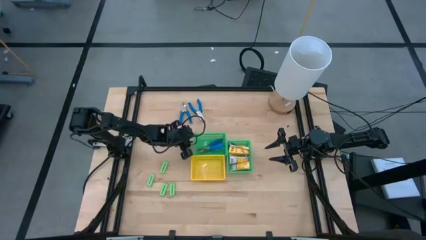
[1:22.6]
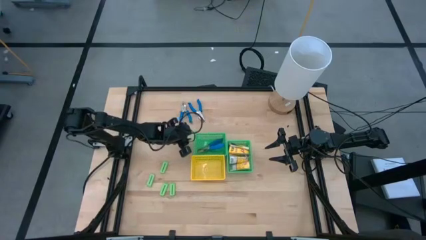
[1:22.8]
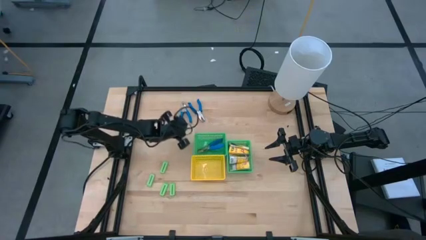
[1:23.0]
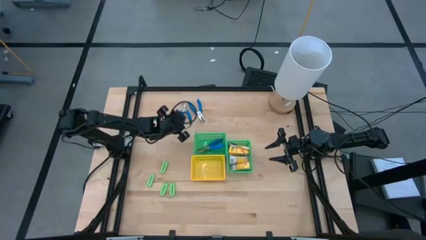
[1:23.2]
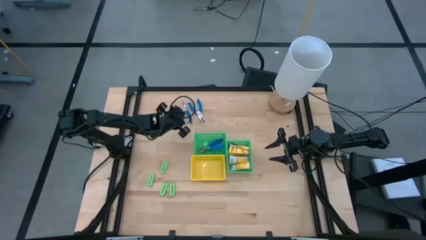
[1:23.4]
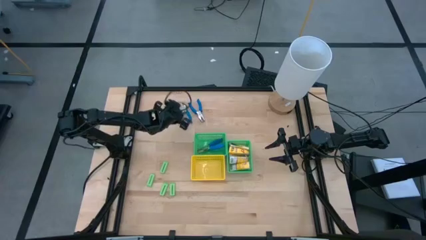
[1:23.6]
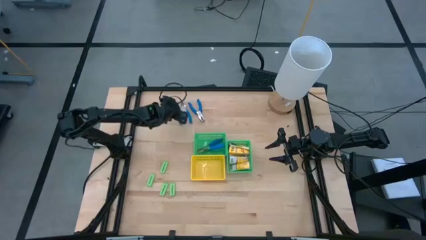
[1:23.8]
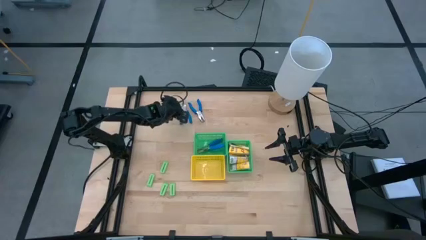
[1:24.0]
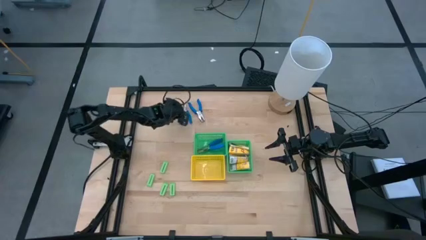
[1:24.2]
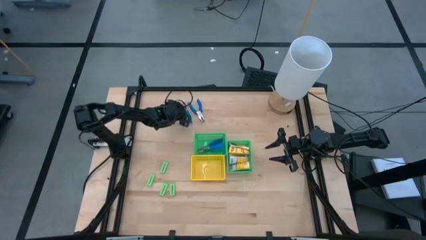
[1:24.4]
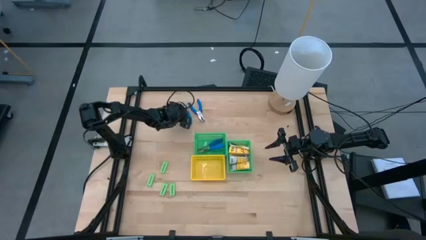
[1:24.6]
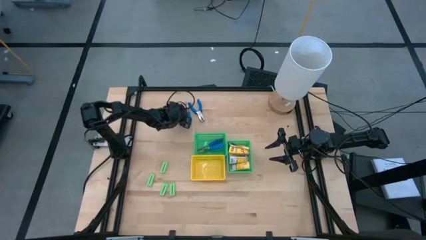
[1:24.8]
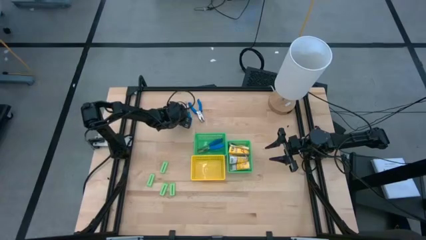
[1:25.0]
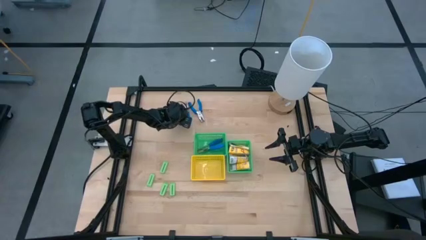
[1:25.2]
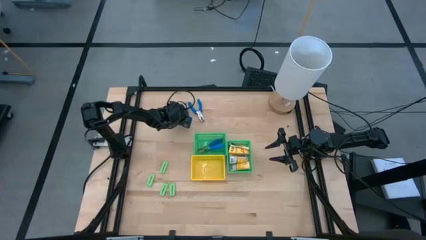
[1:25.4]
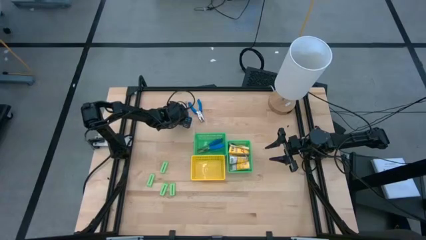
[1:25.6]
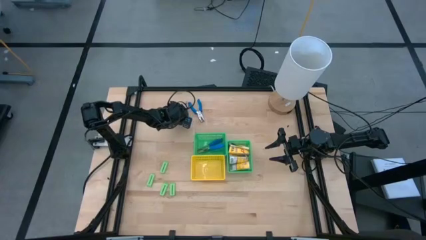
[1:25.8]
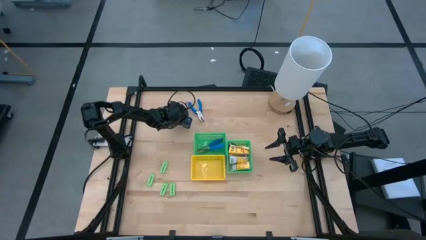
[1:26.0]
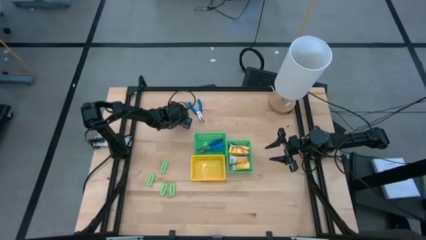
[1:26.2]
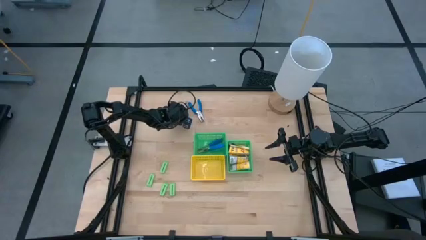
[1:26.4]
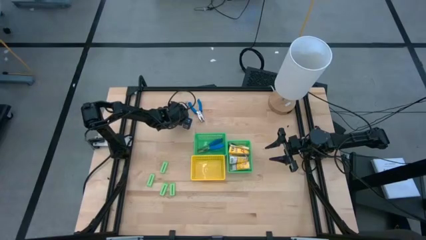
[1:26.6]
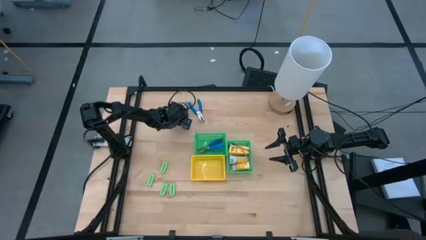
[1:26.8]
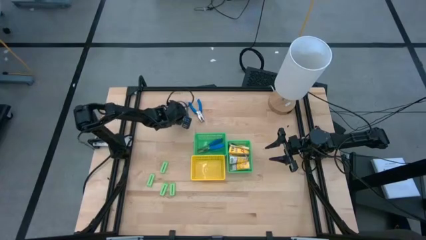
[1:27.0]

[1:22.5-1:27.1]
Task: Pick & Place School Supplies
Put the blue hole puncher into the right green bin

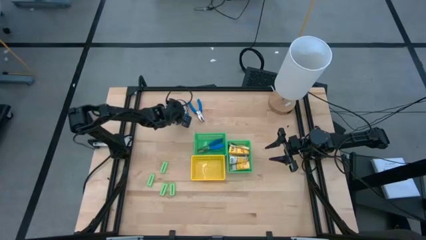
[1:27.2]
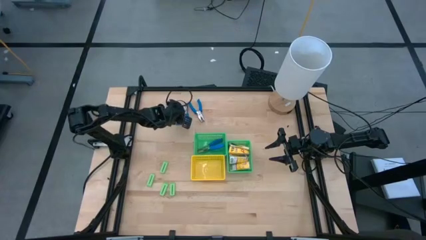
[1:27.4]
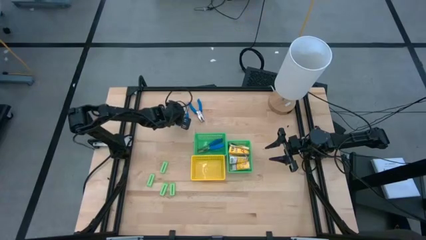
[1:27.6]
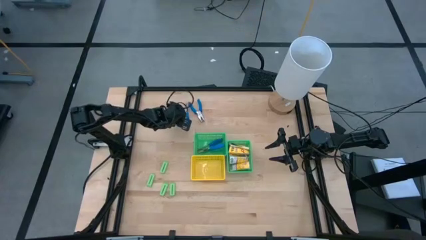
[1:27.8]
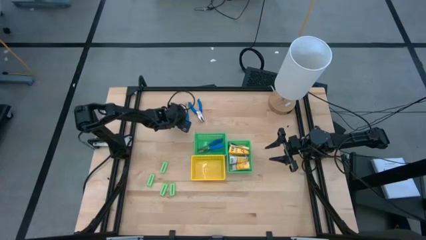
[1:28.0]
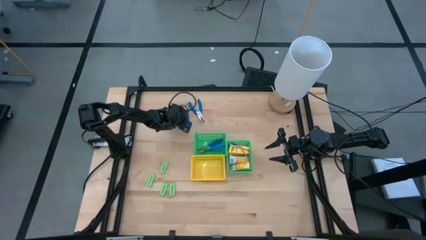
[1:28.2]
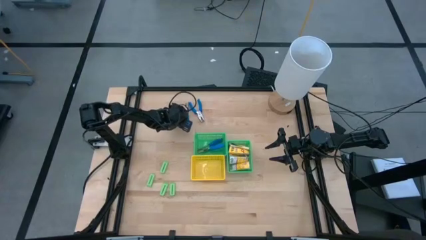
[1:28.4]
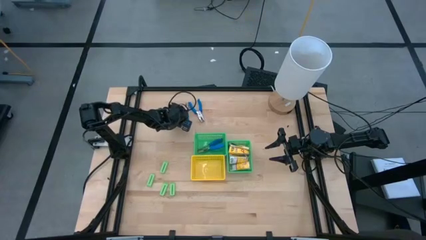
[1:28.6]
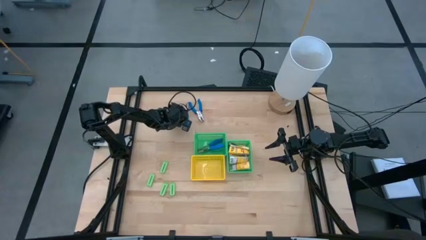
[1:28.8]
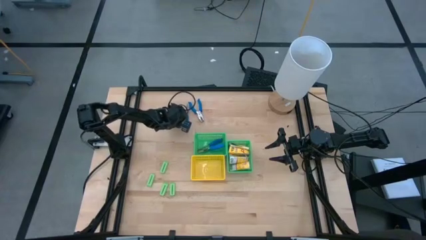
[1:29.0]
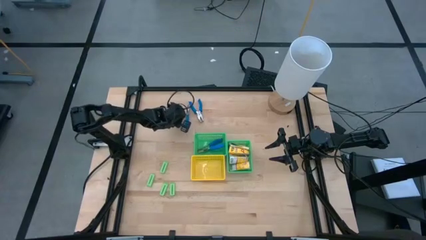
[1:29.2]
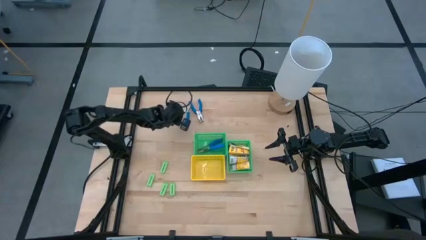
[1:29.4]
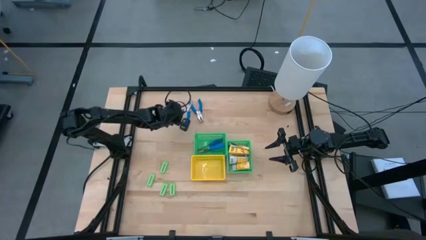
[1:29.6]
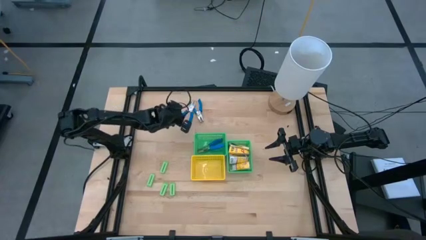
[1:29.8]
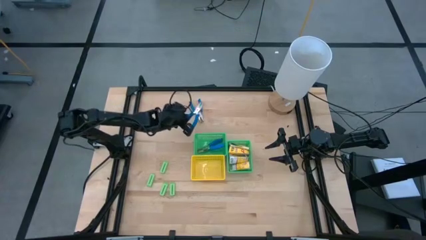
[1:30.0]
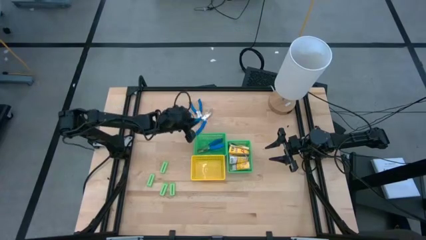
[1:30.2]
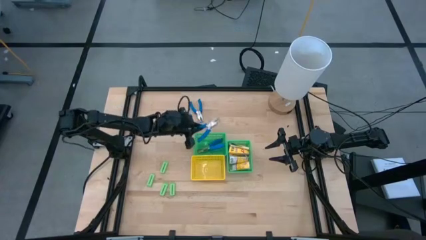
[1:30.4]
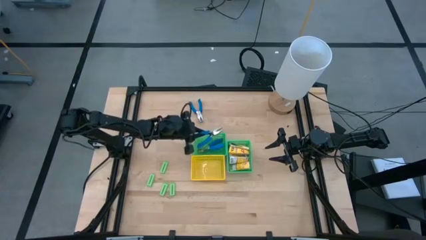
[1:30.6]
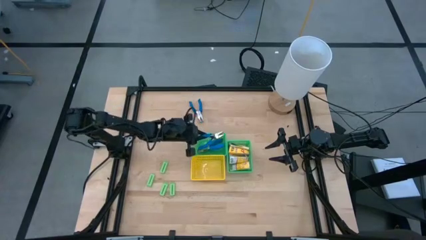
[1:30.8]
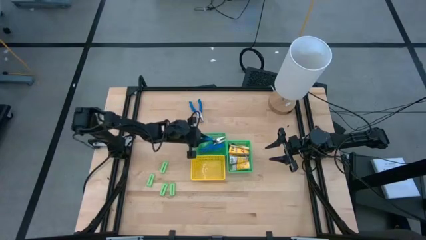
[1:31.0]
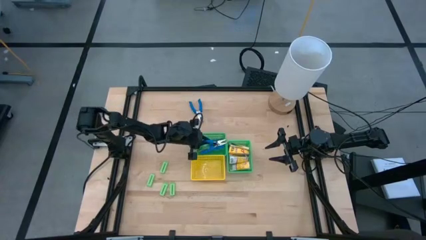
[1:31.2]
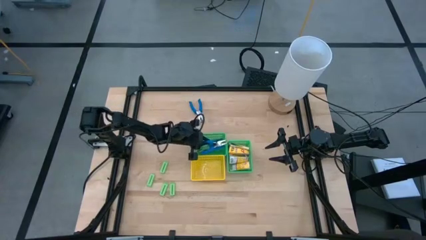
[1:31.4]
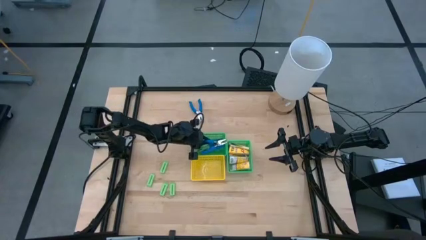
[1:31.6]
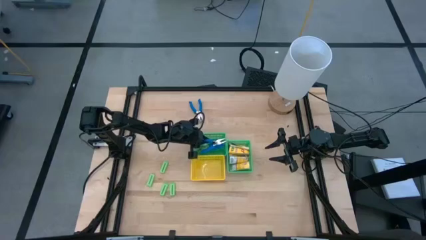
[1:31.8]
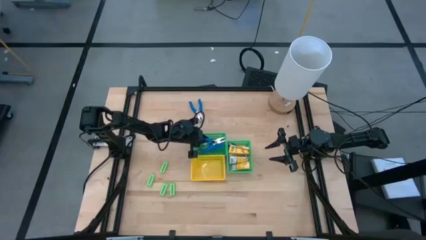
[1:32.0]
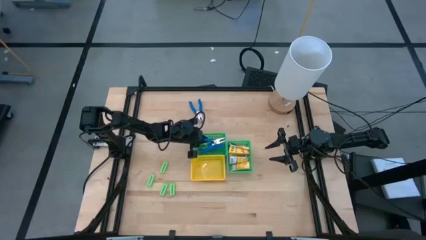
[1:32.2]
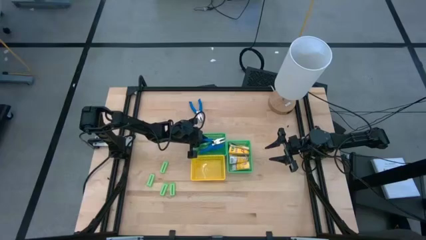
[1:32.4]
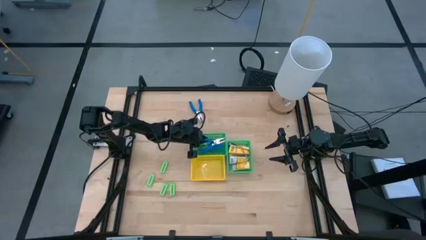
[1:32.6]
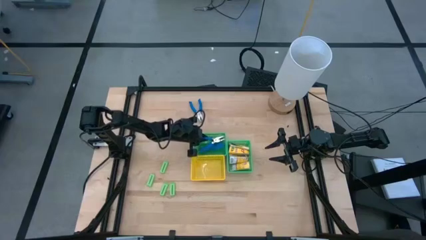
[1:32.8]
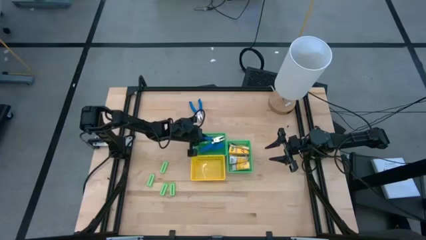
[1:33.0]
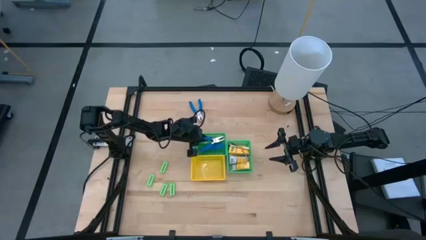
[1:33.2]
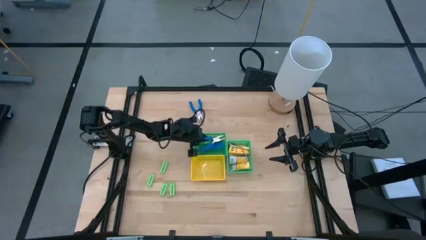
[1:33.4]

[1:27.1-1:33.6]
Put the blue hole puncher into the right green bin
